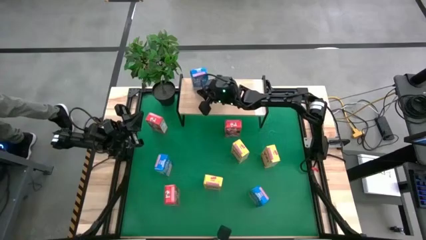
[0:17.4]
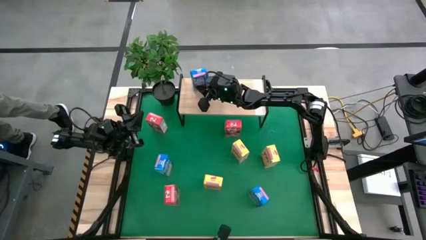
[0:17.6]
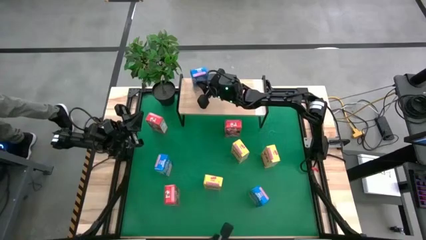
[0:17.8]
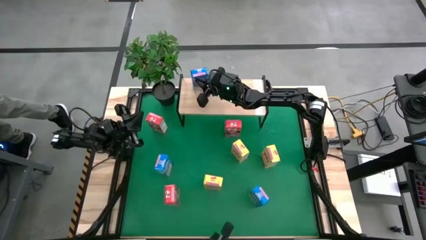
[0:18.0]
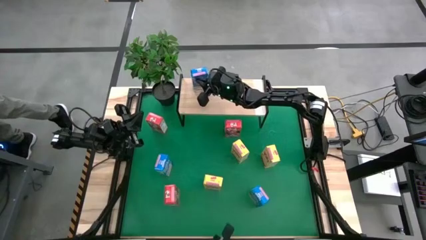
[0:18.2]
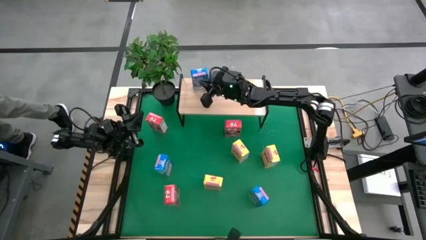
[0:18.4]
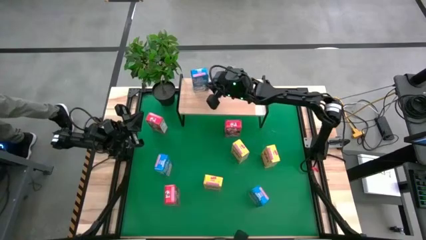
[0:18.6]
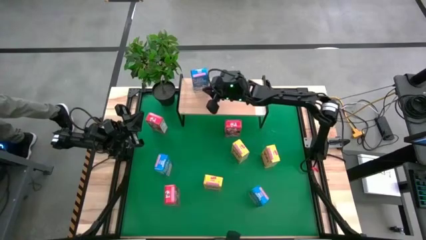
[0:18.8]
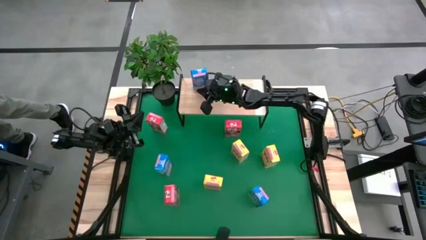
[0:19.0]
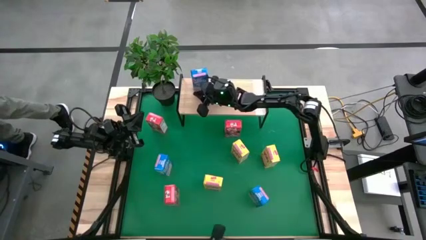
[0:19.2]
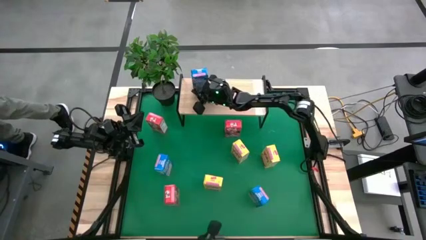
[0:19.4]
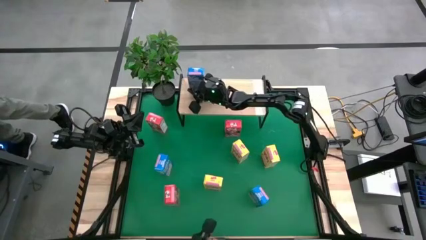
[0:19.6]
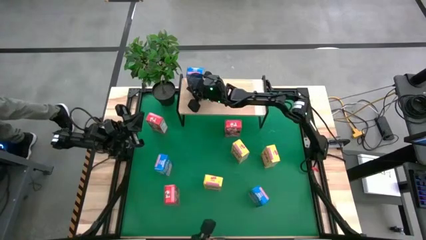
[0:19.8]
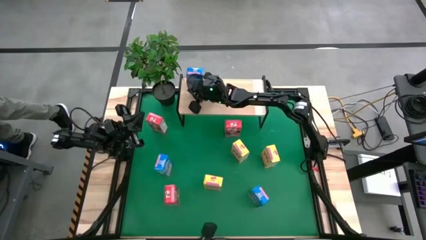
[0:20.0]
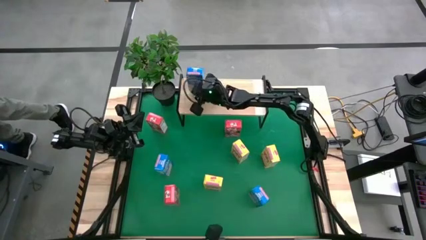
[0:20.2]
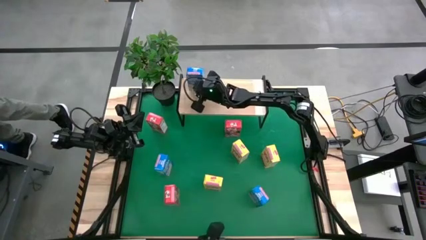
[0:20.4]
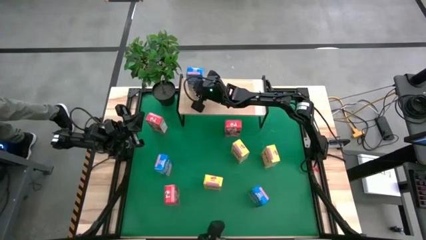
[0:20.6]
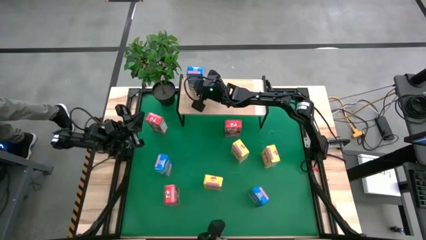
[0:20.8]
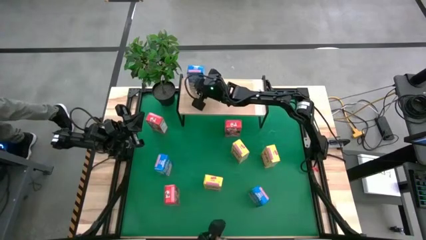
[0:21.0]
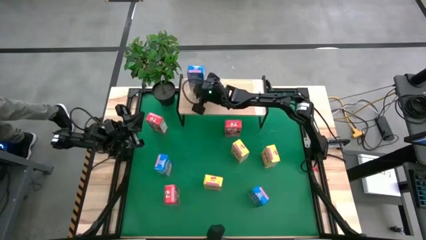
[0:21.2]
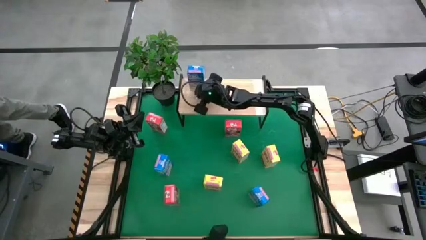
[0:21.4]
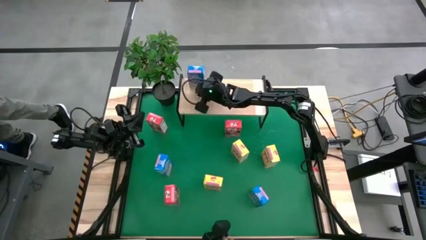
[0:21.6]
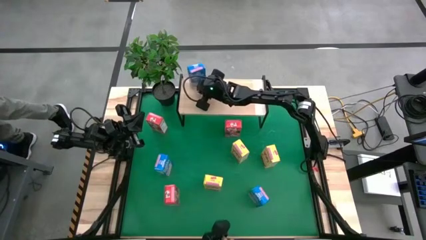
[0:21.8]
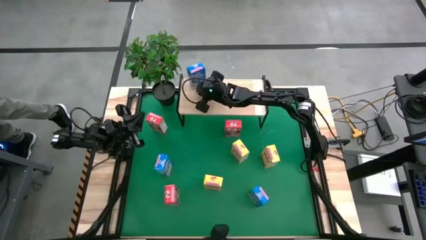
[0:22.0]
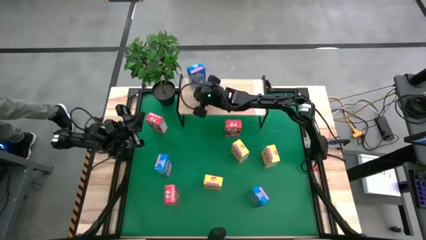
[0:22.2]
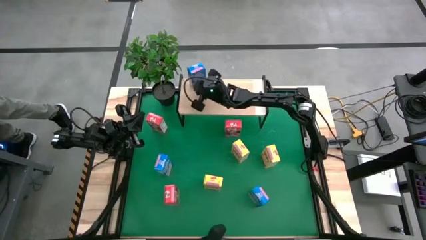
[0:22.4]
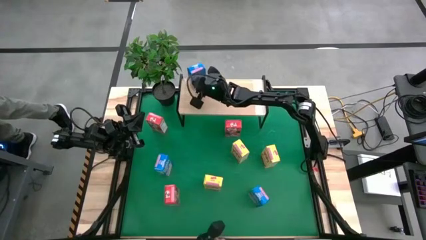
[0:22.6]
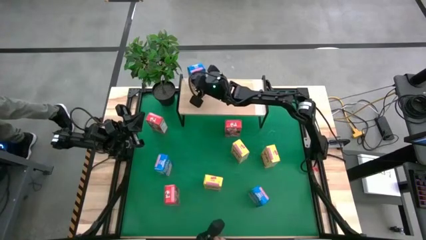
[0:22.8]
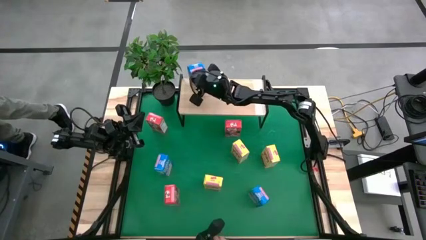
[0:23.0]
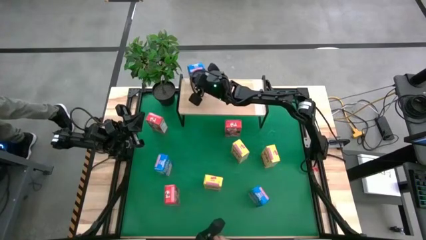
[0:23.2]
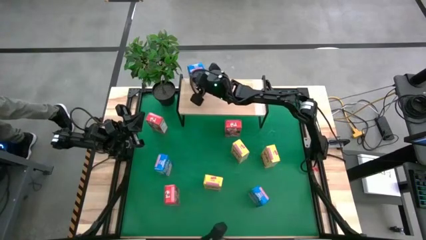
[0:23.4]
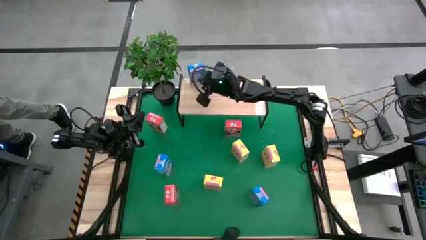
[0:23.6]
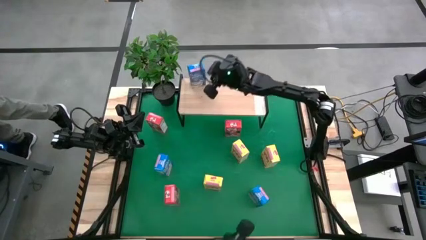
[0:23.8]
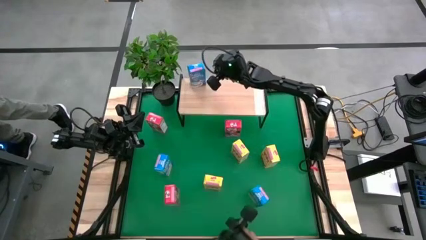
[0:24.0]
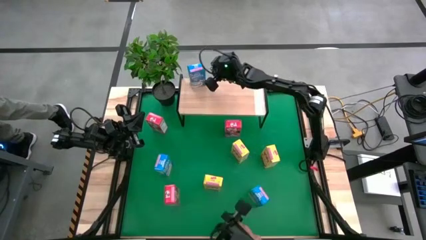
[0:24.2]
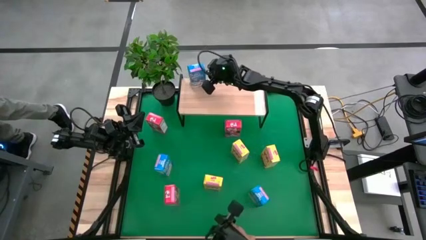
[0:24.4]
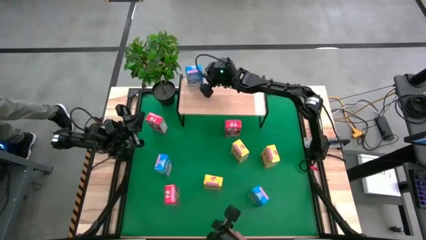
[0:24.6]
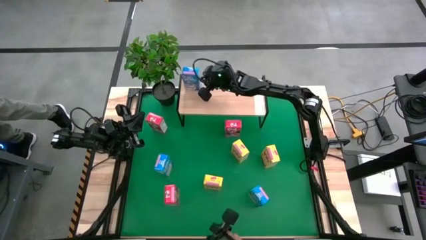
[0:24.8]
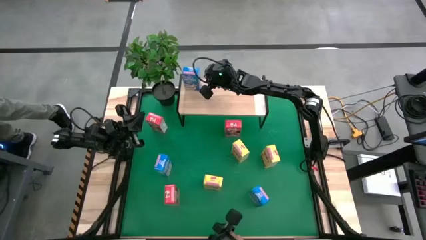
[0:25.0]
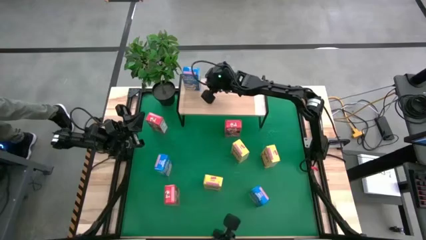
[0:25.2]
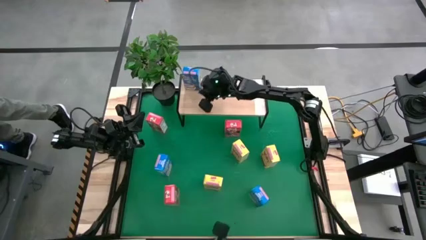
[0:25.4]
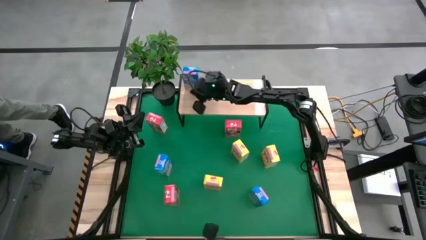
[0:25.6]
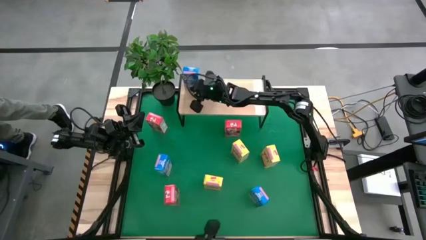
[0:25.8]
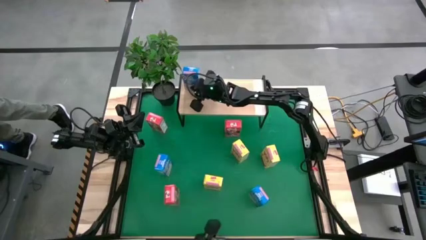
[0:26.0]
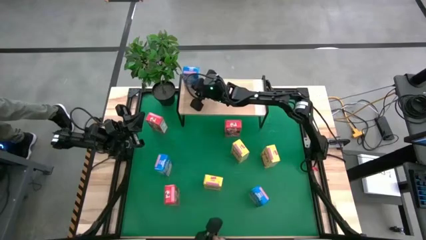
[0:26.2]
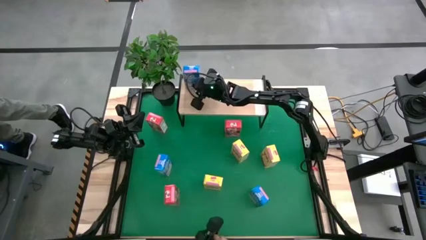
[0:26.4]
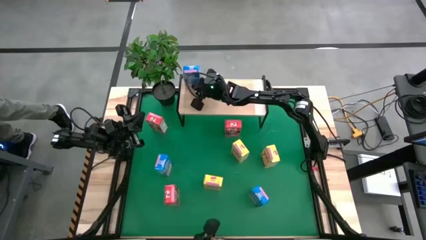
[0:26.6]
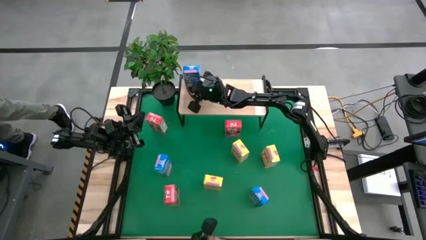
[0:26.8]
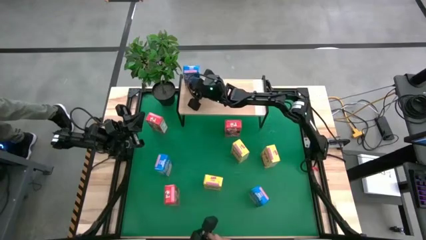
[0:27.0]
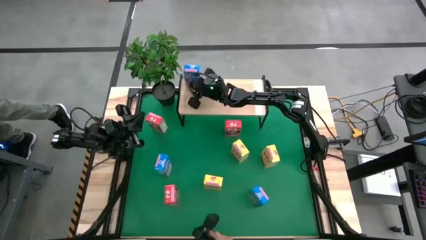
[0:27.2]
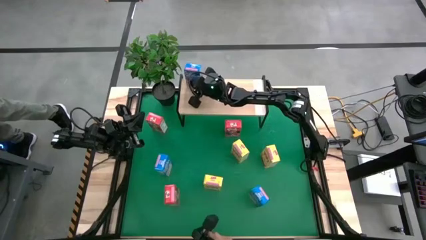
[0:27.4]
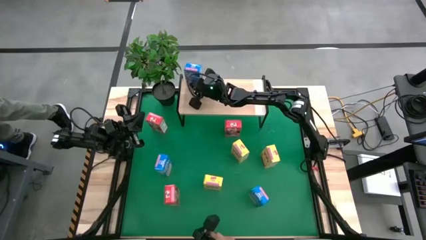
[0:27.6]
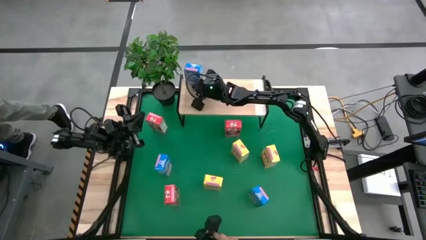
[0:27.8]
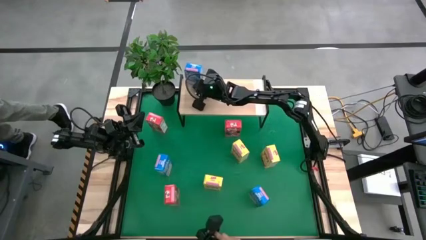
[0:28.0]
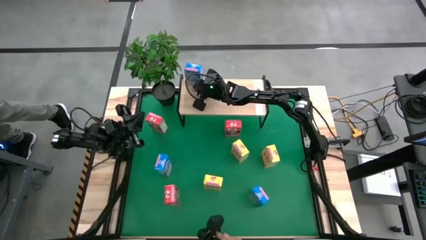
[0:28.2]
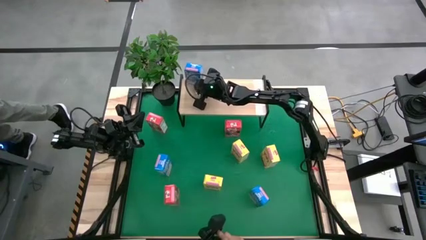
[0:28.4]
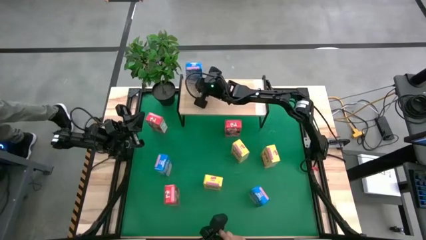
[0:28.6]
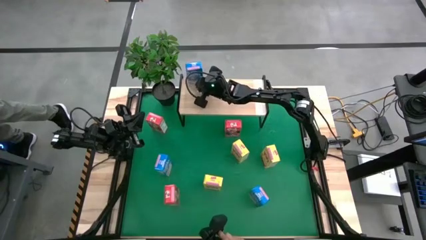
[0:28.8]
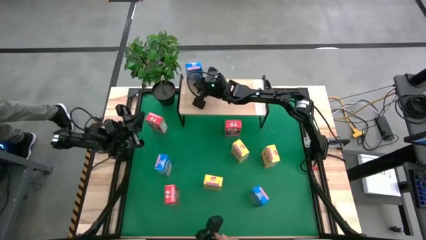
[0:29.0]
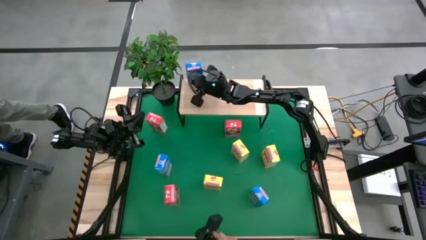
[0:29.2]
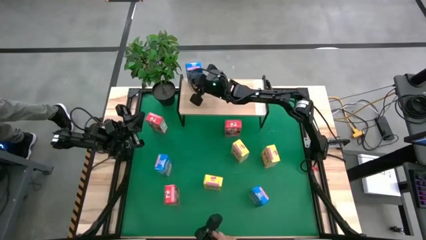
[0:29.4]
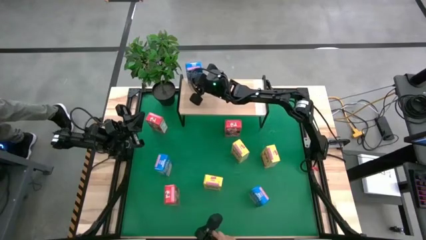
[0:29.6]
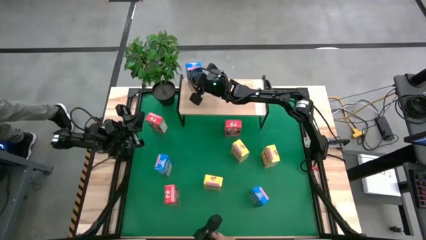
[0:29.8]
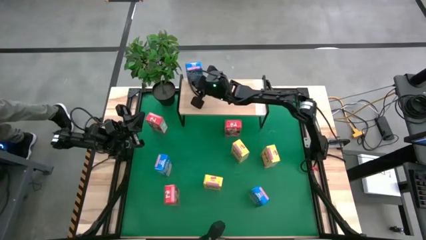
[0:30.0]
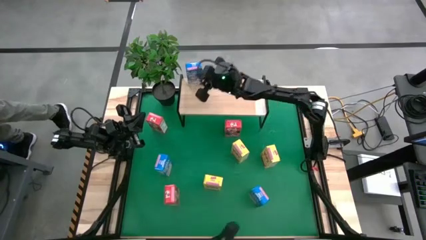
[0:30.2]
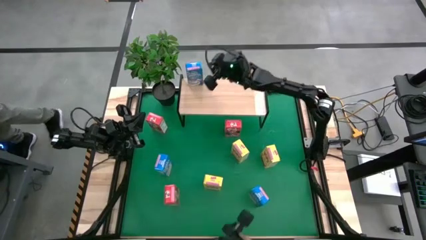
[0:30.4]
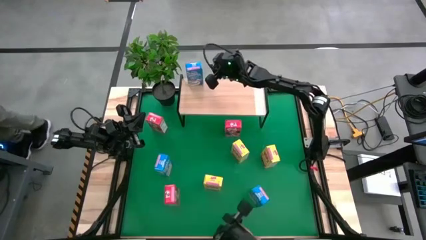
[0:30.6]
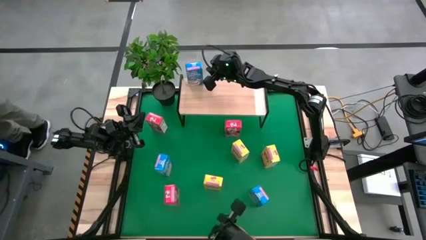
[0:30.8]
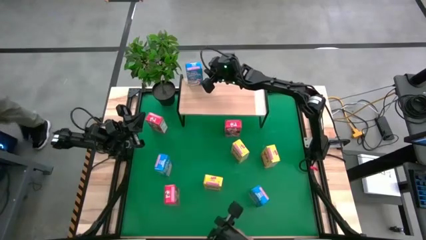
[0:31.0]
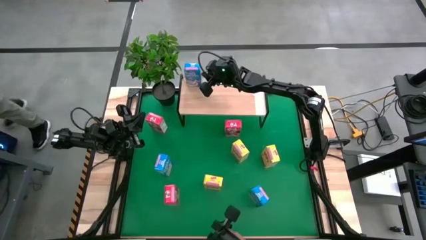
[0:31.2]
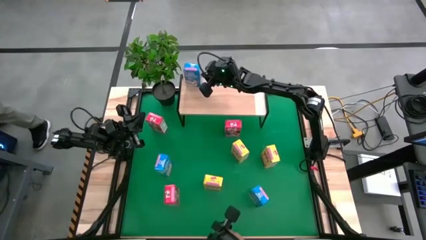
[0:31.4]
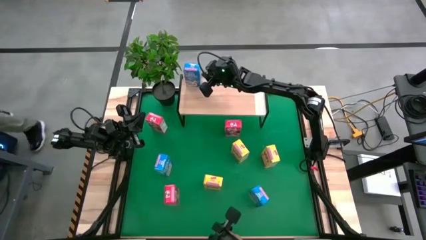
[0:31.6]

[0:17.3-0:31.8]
Task: Stack cereal on shelf
Put the middle blue cereal box on the shelf
